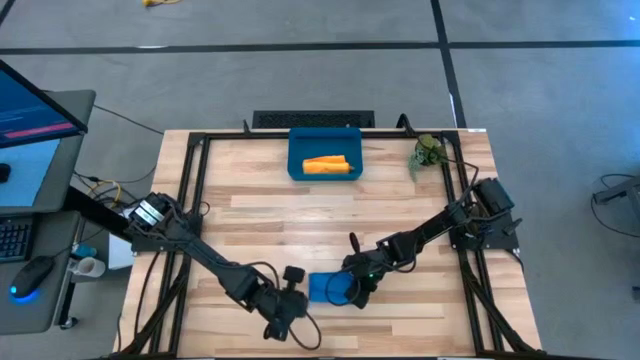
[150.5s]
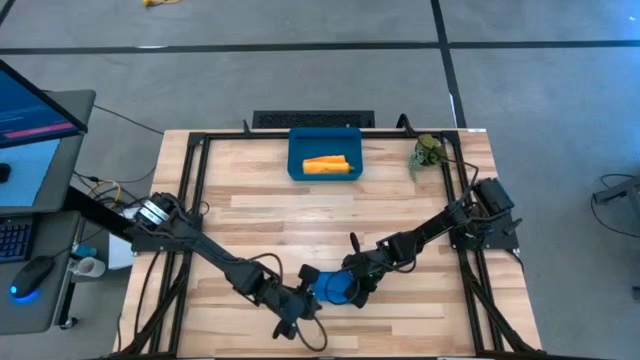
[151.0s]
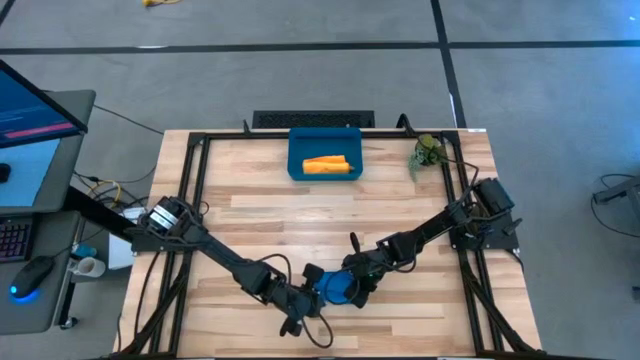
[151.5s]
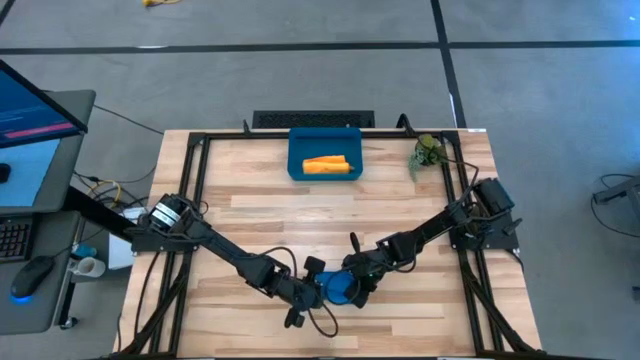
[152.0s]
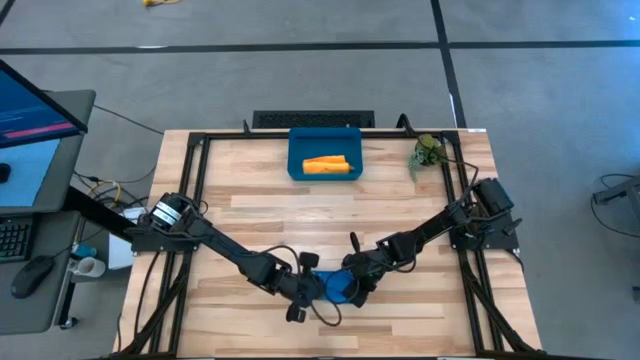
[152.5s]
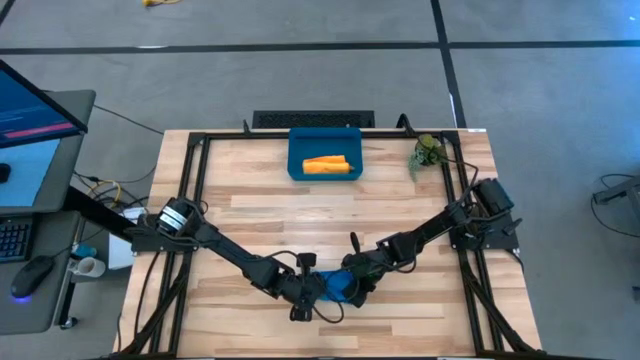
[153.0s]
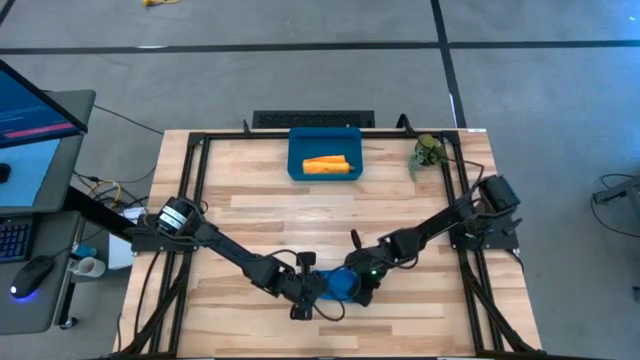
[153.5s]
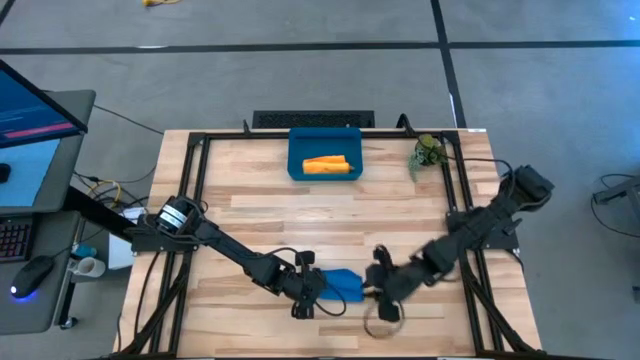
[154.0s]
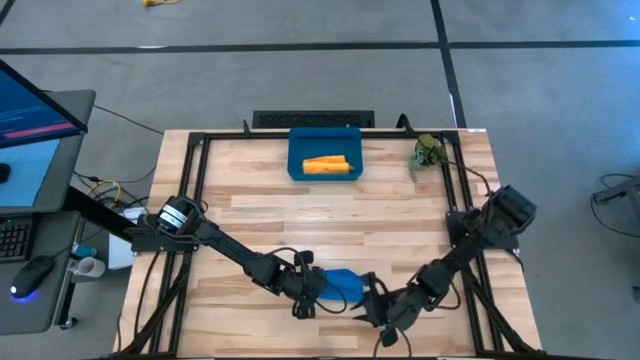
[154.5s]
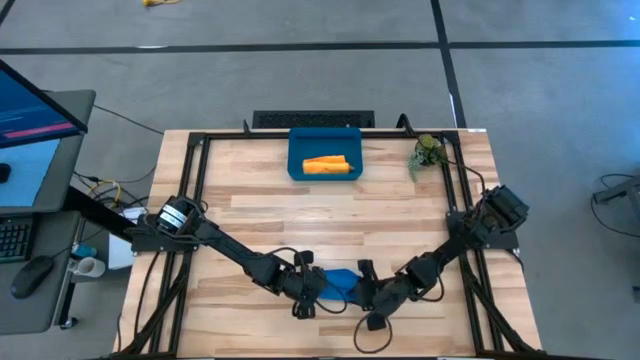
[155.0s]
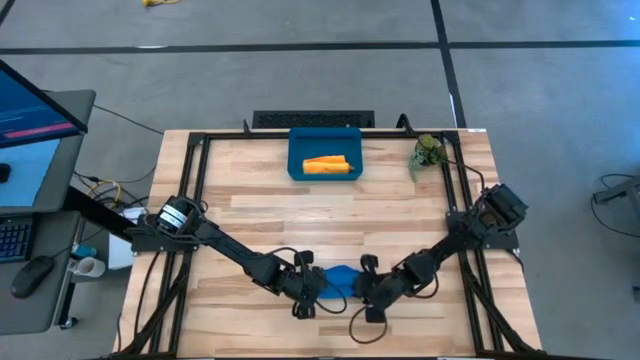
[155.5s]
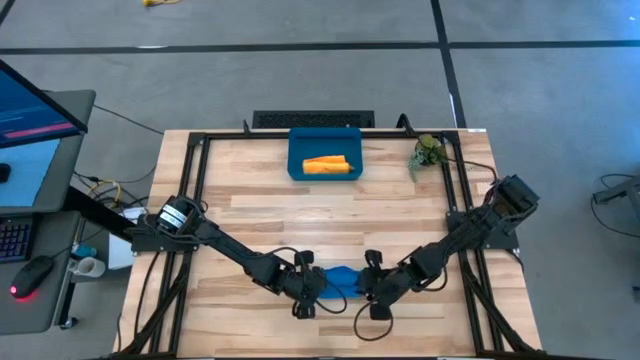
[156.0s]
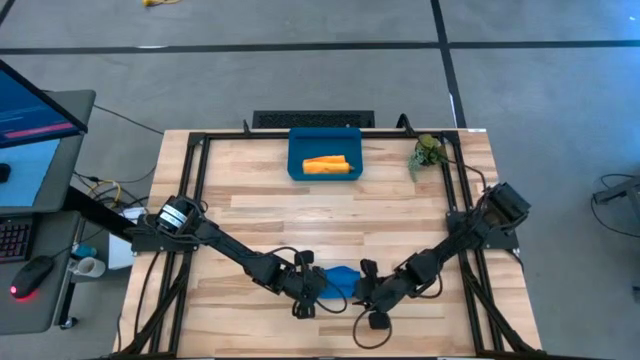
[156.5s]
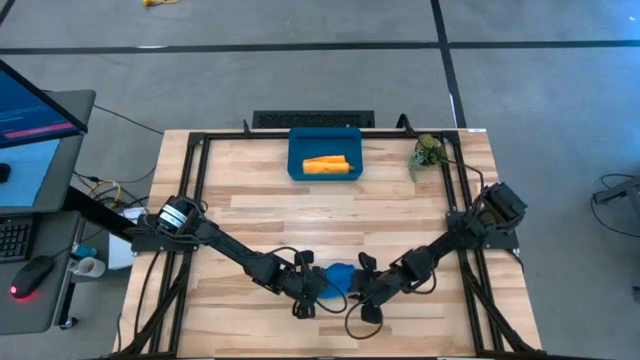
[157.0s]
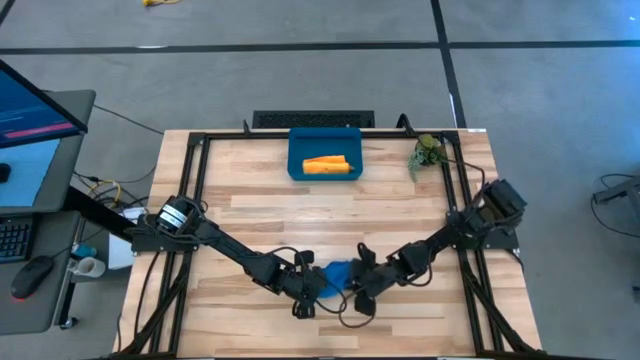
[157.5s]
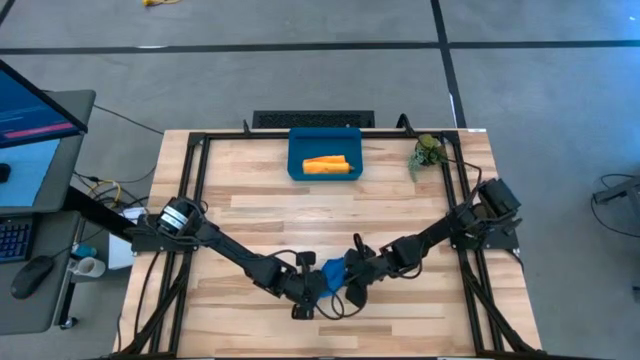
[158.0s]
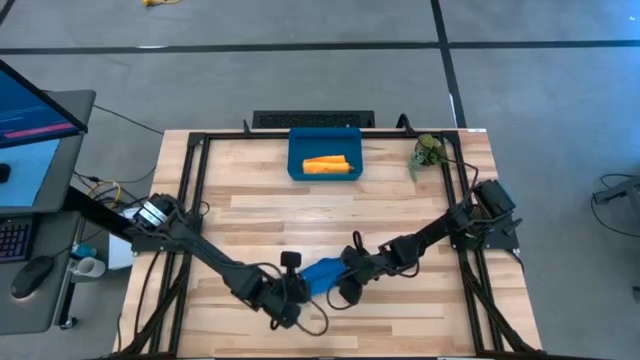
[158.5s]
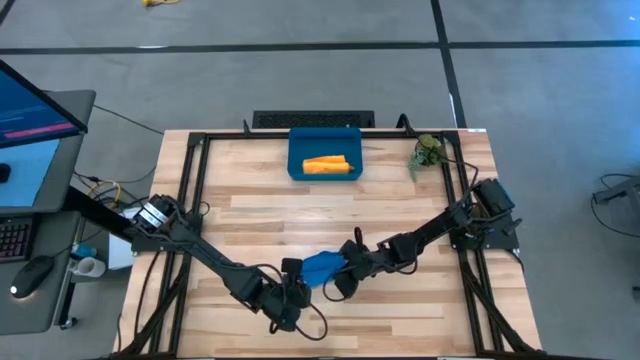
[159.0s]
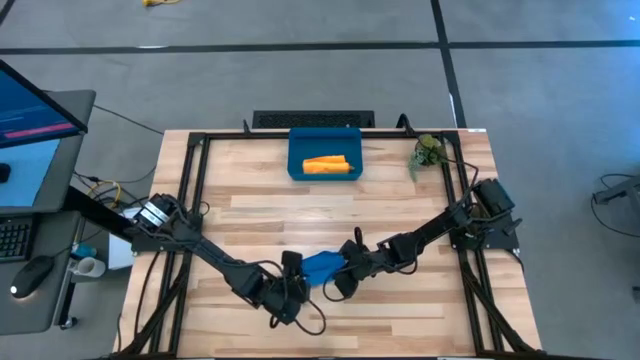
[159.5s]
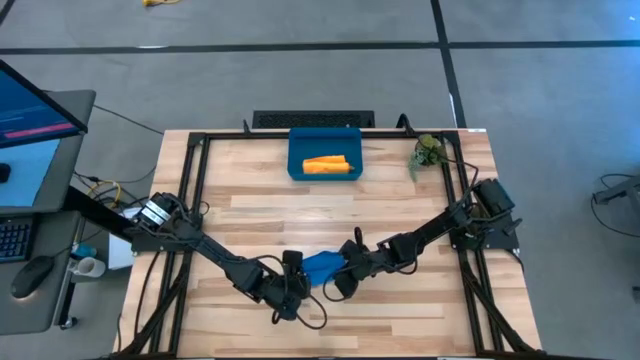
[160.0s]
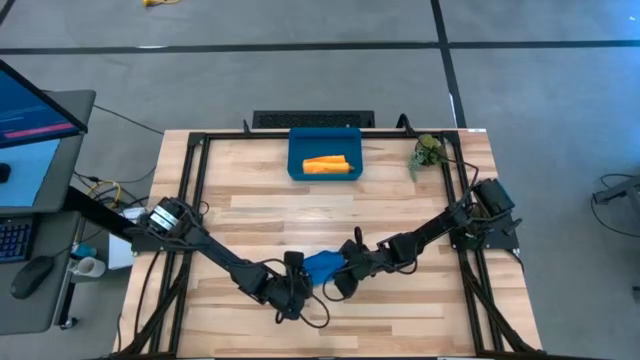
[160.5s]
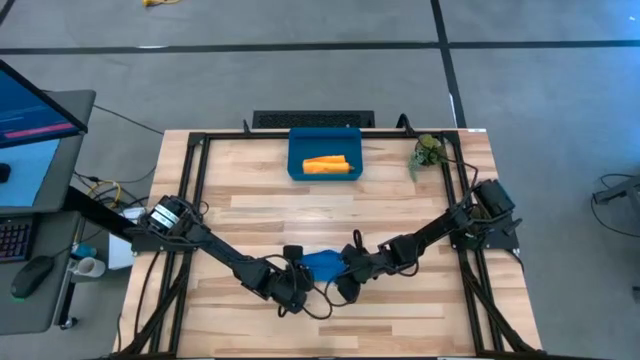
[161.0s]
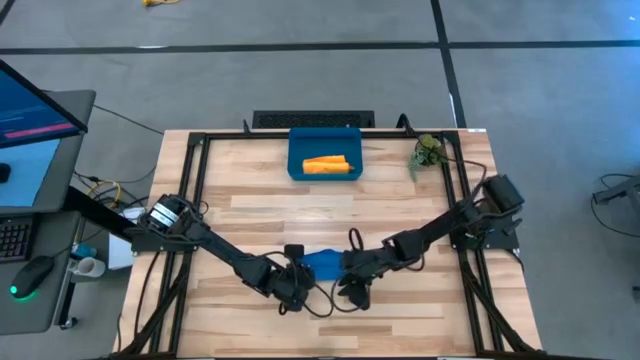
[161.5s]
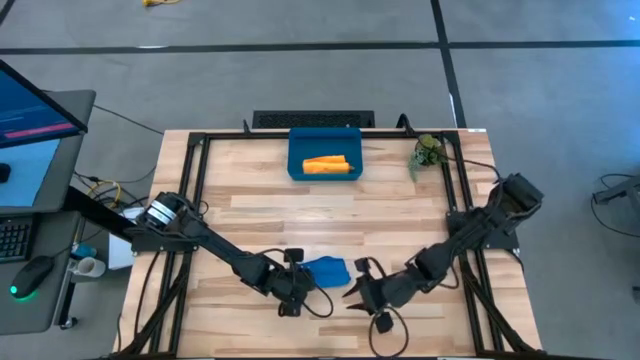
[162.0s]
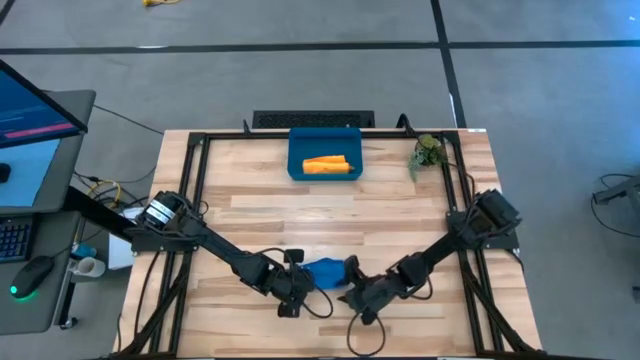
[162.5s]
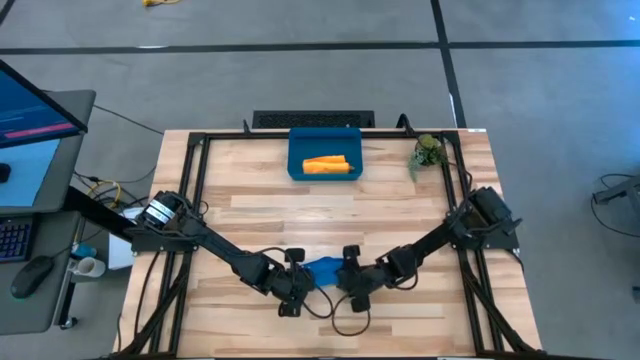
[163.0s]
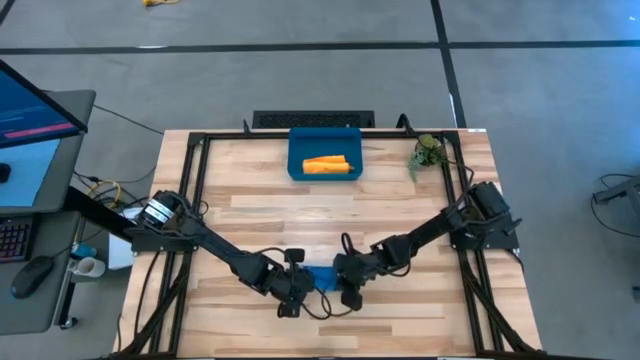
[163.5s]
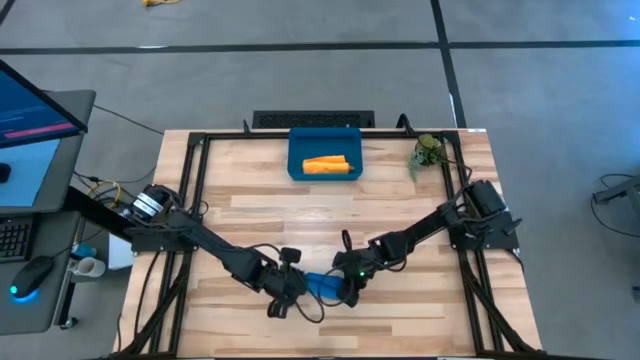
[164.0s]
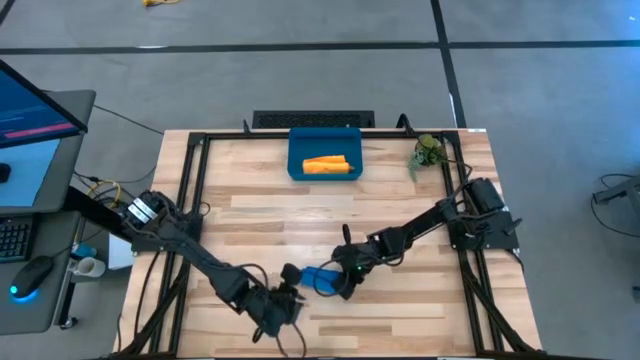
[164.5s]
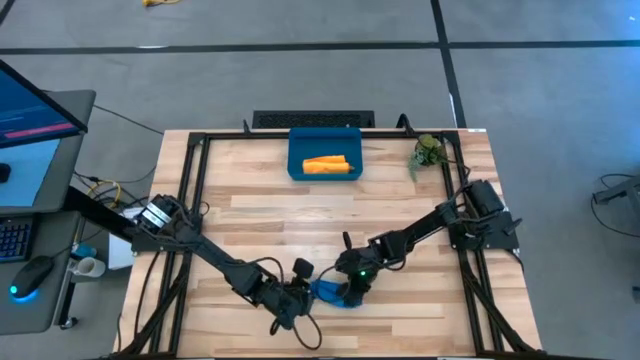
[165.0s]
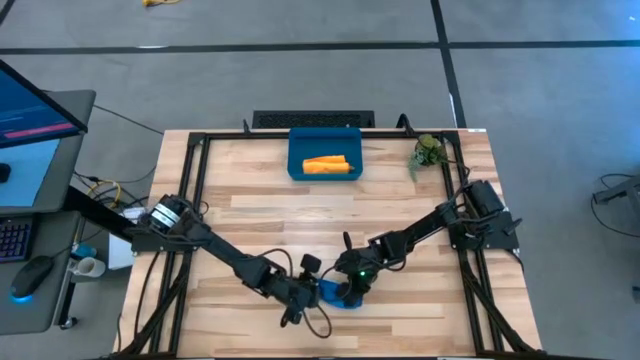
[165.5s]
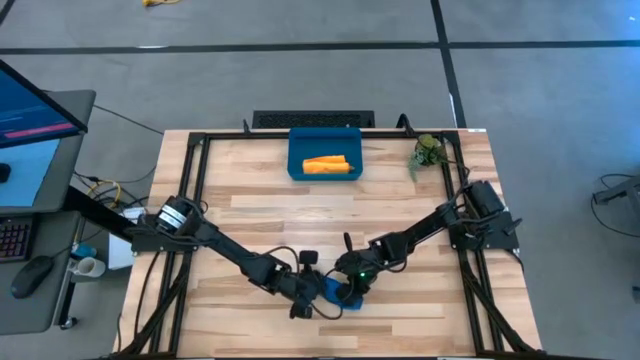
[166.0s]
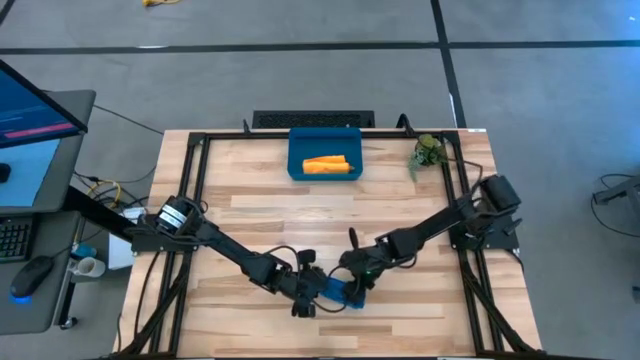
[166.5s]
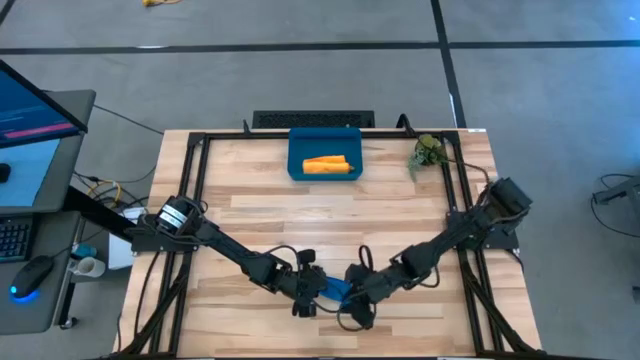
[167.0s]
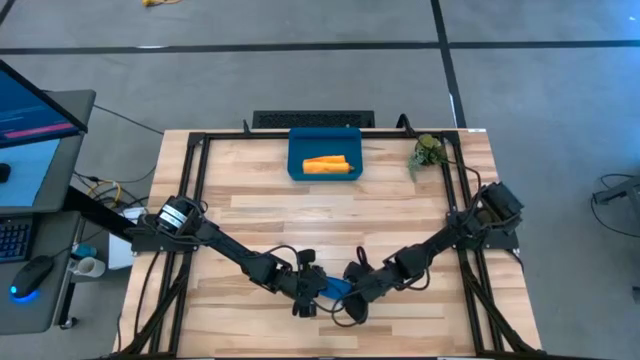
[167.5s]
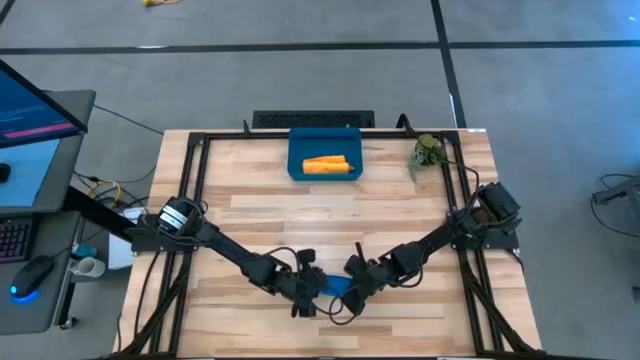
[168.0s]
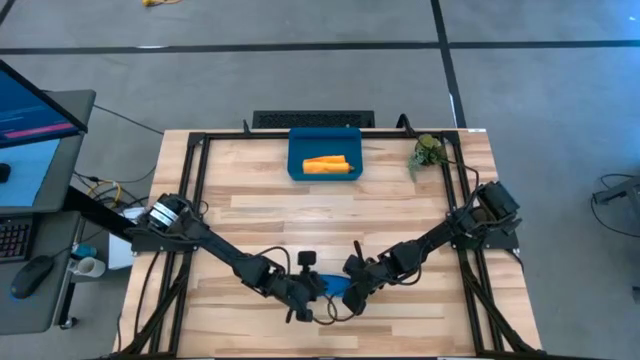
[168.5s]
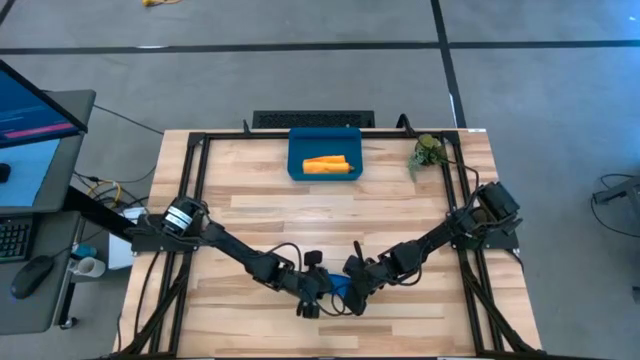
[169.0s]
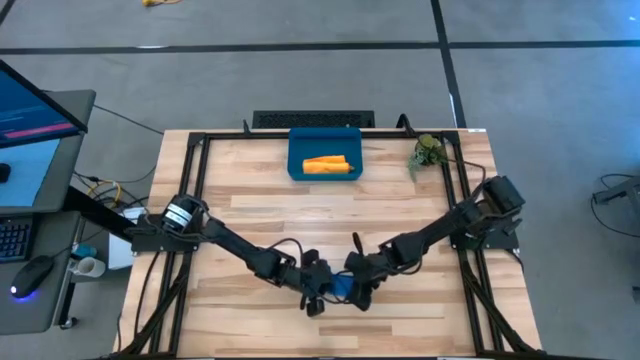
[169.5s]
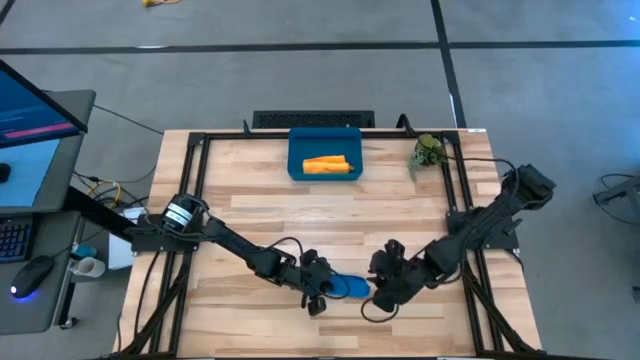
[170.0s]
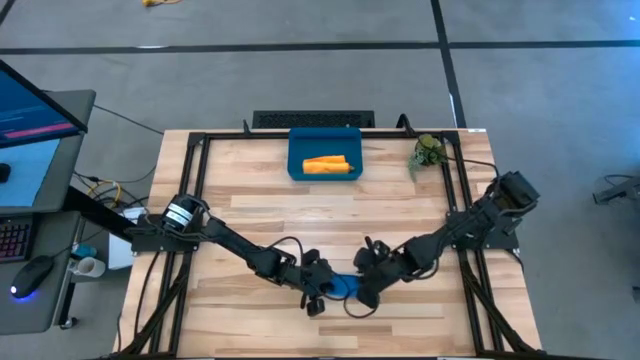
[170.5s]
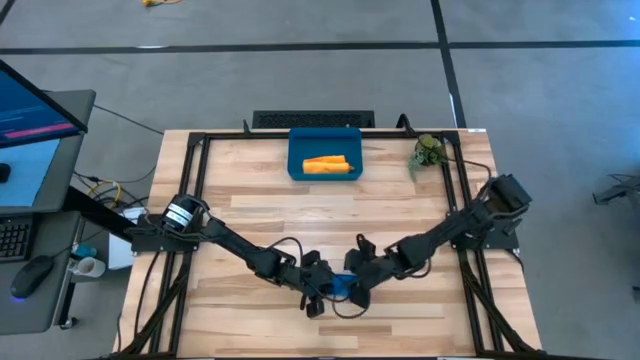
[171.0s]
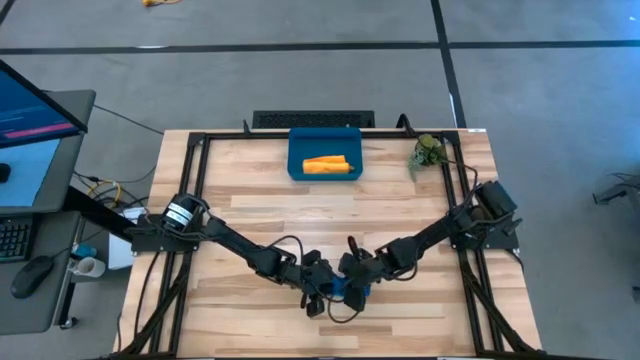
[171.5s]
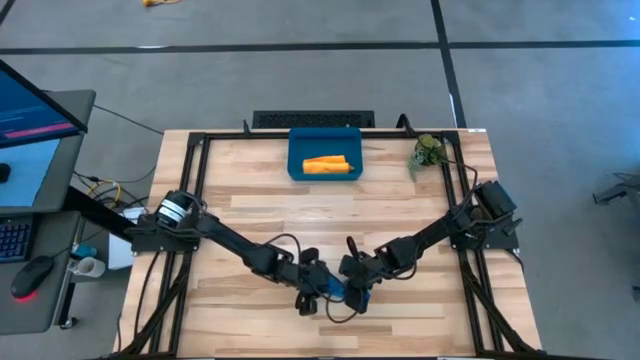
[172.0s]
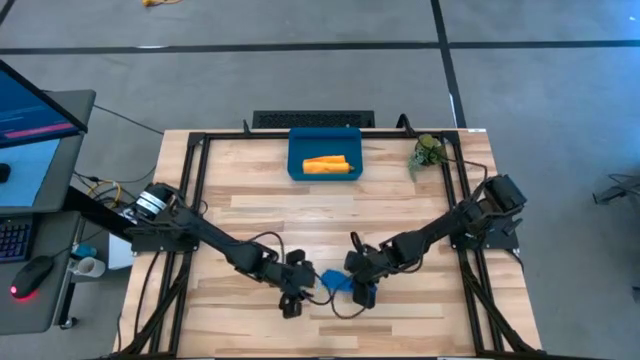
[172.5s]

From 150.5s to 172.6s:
Task: Roll microfiber towels into tight, uniform cylinder then place into a basket
Roll the blue microfiber towel
